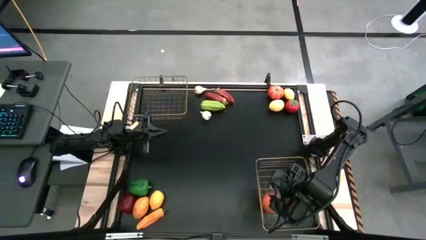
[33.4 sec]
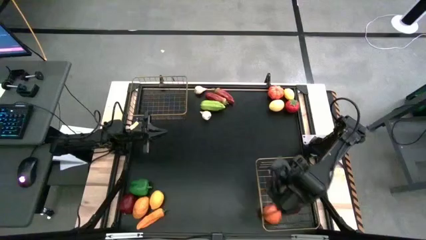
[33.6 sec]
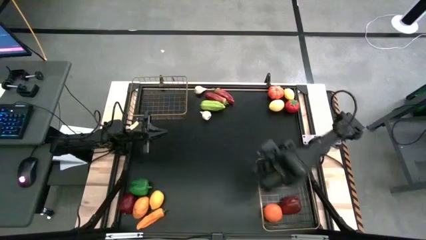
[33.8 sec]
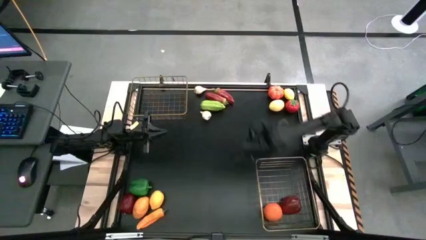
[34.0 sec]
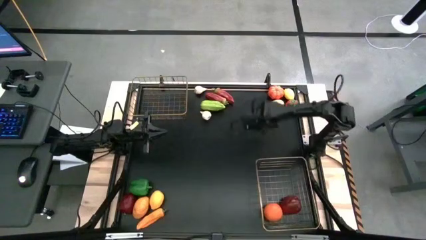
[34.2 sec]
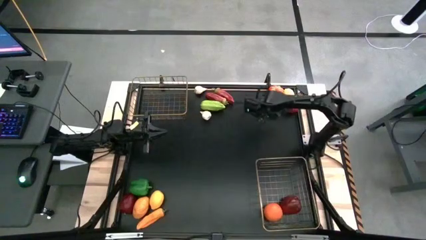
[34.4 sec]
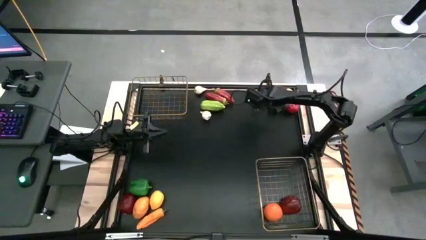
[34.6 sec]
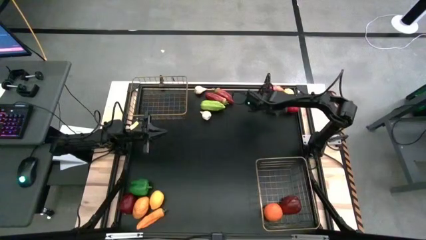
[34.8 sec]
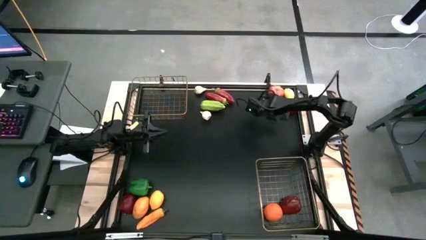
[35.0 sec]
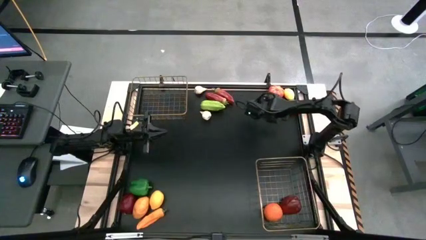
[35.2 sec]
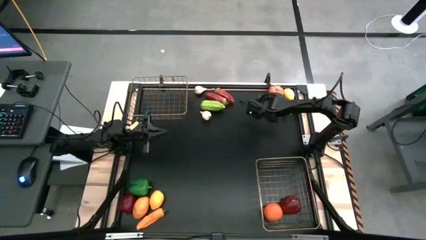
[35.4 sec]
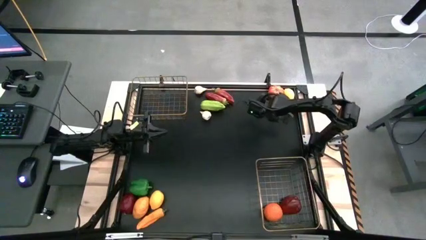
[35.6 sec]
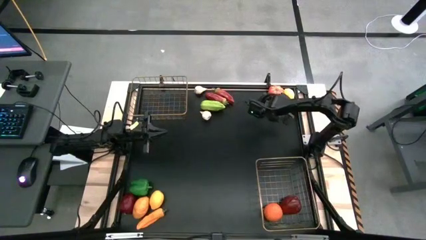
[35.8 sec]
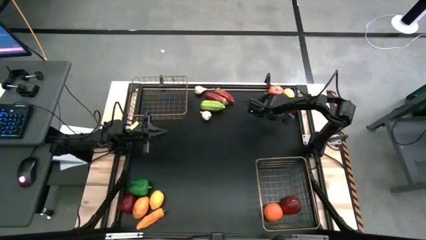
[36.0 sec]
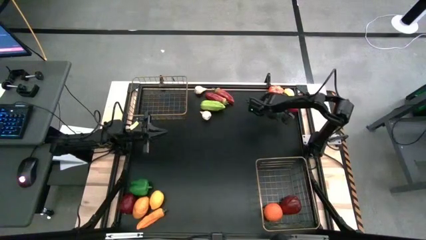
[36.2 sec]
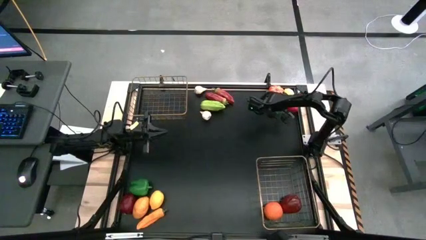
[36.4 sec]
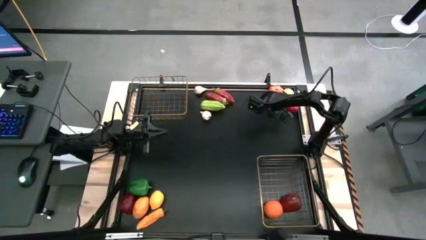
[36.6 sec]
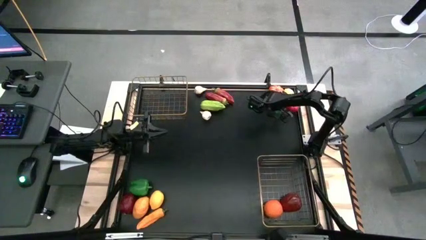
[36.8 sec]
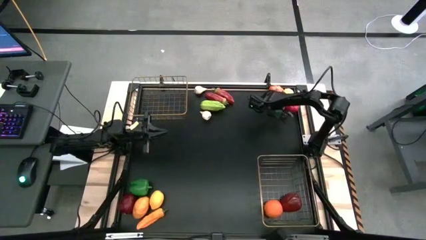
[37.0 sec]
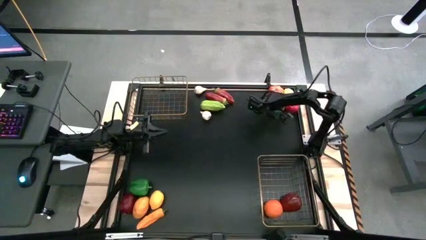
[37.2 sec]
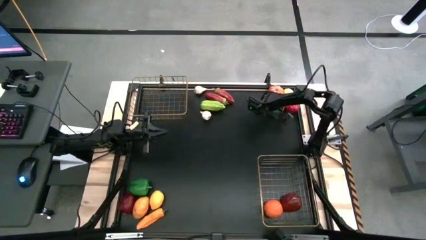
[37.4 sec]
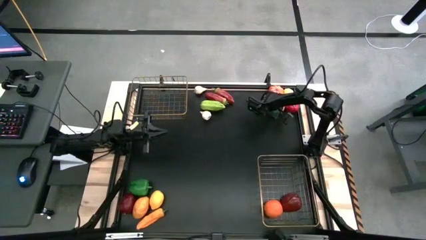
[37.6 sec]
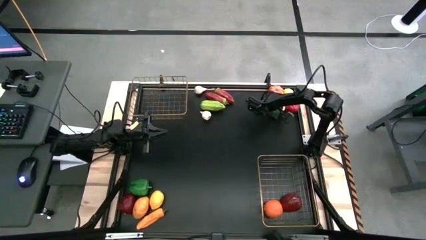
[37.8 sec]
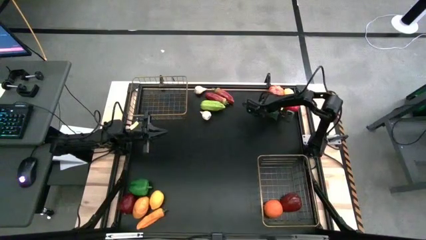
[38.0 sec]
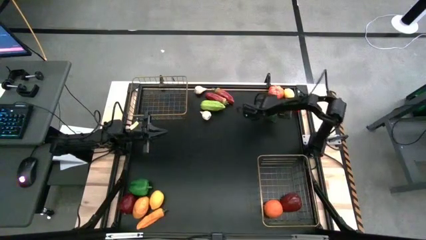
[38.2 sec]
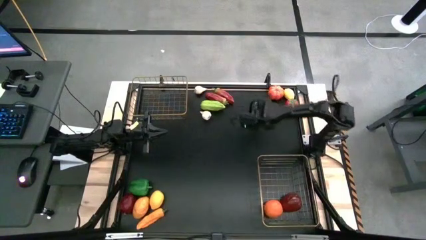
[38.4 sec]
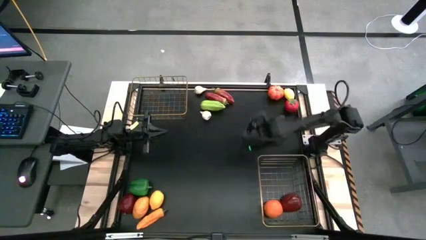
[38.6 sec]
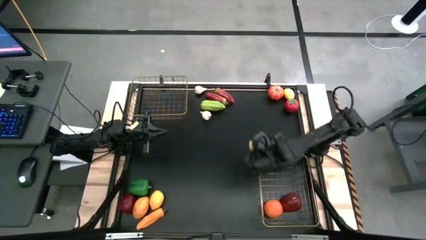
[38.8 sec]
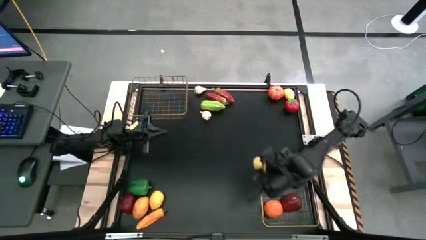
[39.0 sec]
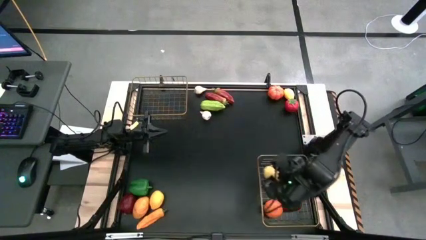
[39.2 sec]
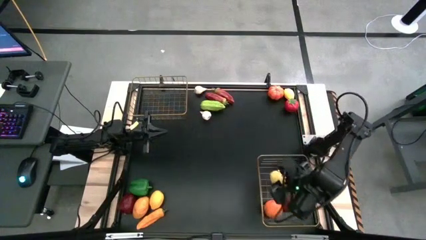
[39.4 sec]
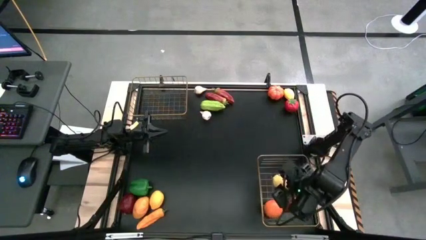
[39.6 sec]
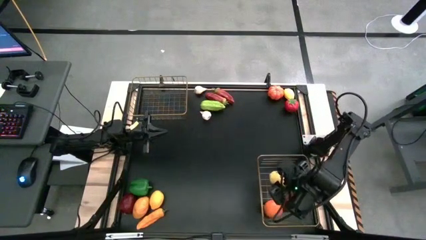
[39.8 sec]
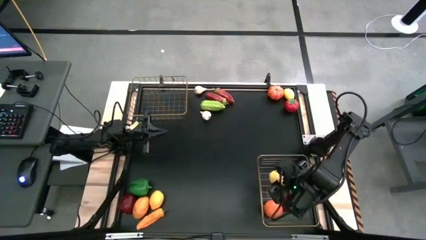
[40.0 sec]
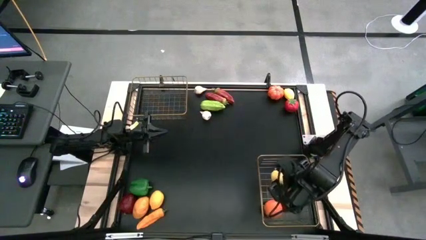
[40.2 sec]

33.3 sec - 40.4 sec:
Task: Sort produce into baskets
Put the top left yellow lemon into the bottom wire basket

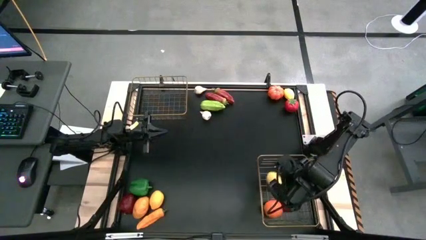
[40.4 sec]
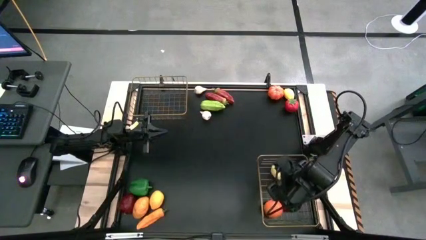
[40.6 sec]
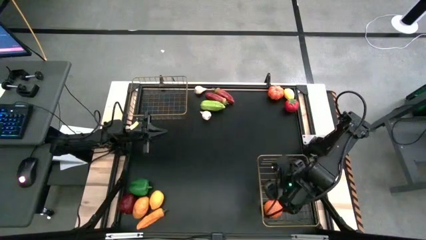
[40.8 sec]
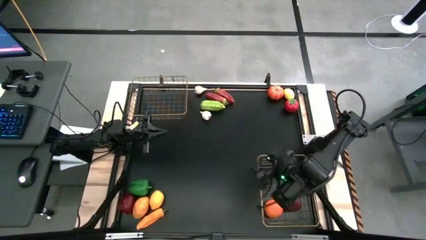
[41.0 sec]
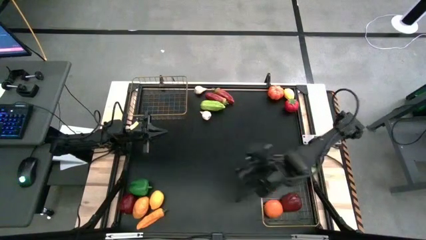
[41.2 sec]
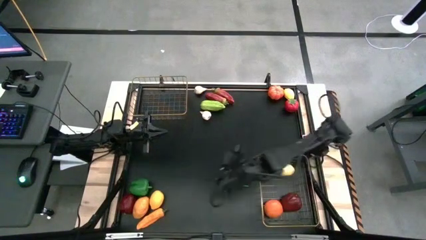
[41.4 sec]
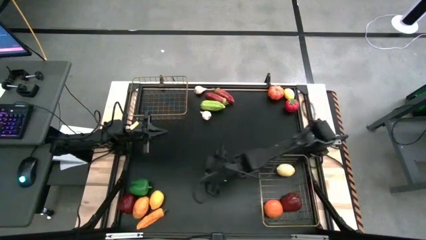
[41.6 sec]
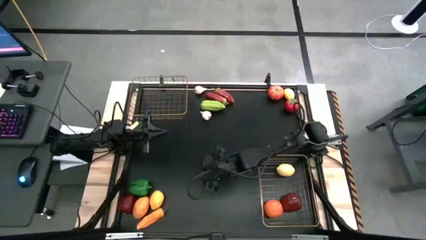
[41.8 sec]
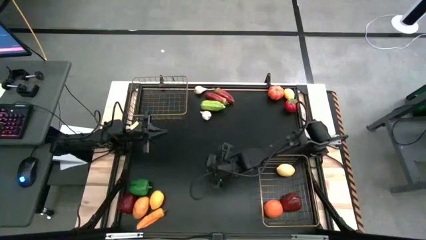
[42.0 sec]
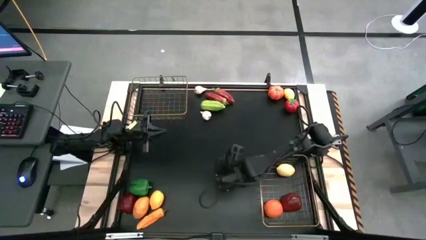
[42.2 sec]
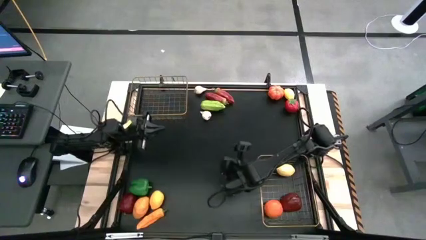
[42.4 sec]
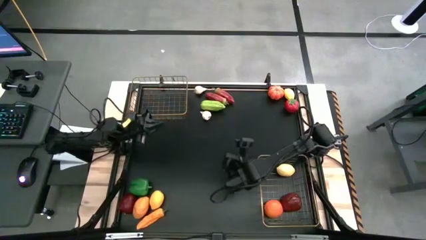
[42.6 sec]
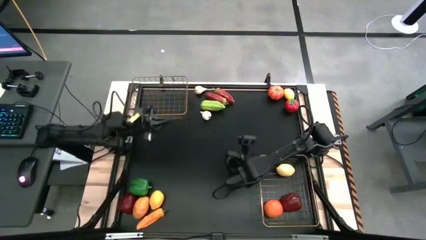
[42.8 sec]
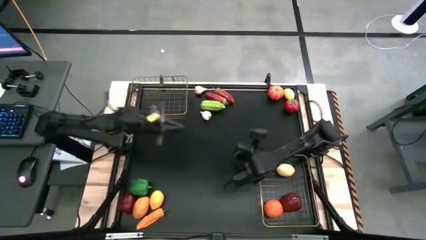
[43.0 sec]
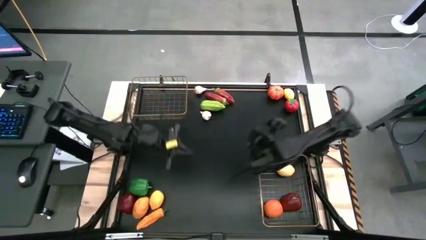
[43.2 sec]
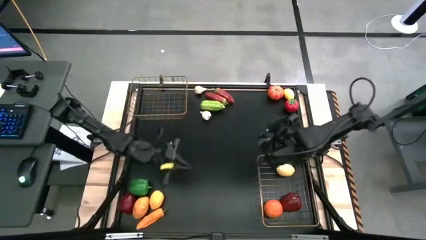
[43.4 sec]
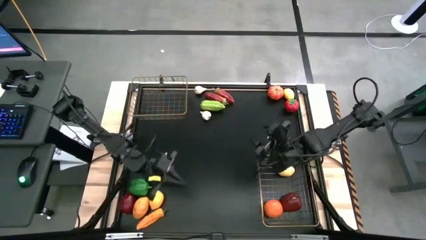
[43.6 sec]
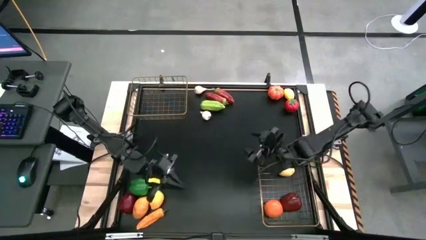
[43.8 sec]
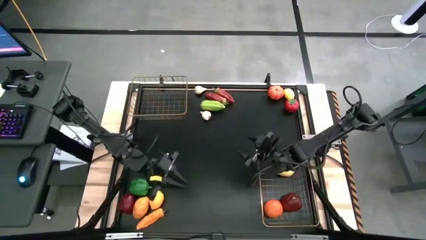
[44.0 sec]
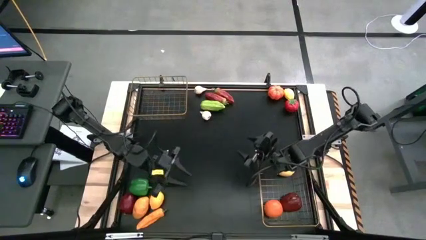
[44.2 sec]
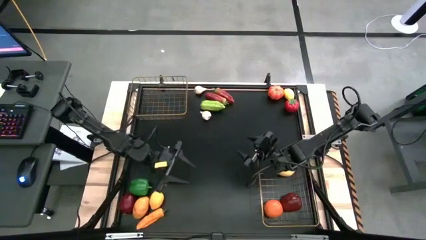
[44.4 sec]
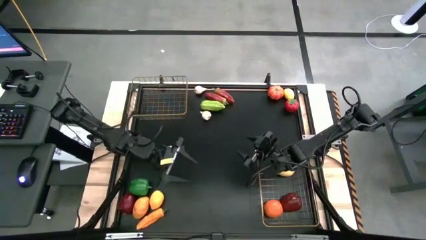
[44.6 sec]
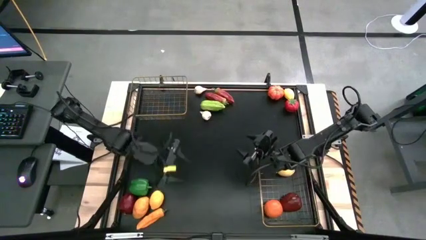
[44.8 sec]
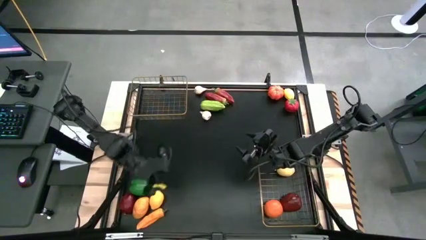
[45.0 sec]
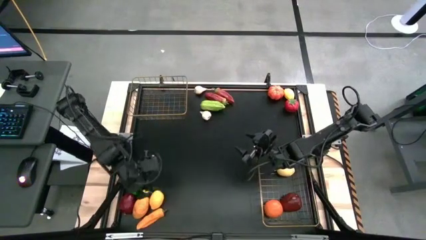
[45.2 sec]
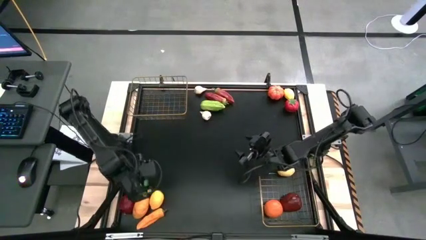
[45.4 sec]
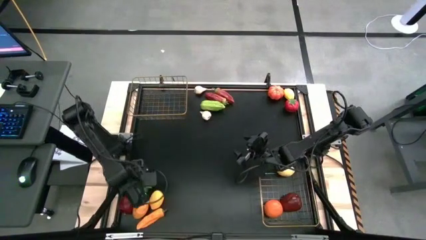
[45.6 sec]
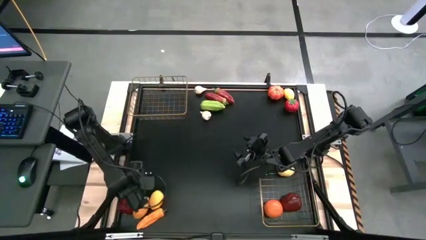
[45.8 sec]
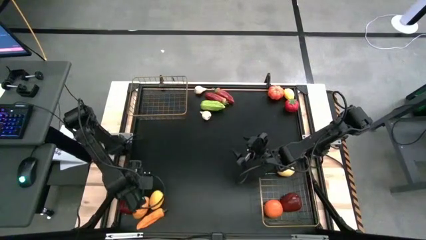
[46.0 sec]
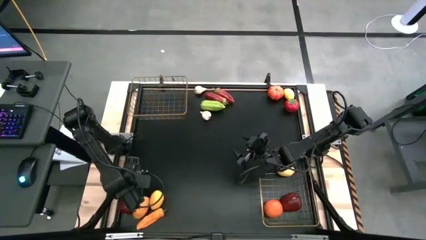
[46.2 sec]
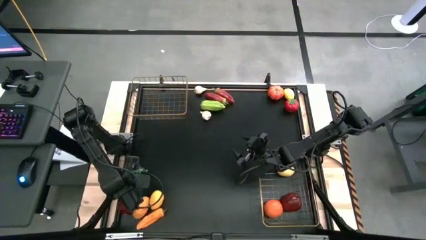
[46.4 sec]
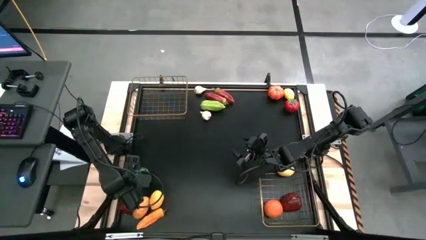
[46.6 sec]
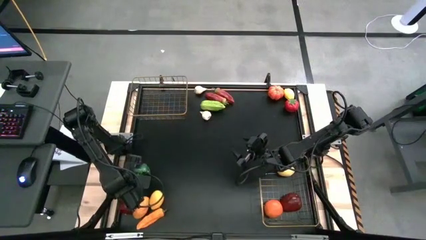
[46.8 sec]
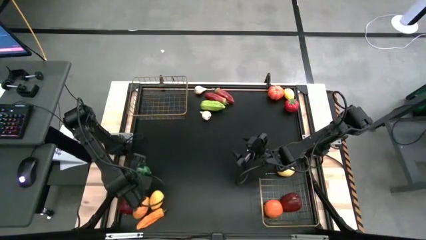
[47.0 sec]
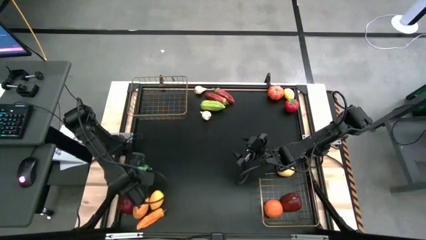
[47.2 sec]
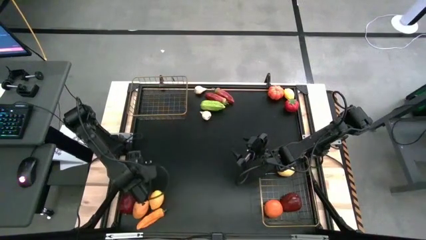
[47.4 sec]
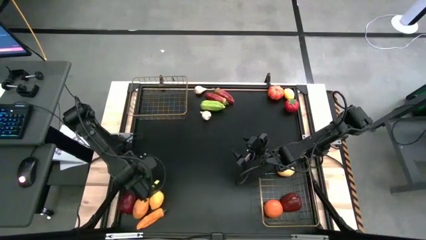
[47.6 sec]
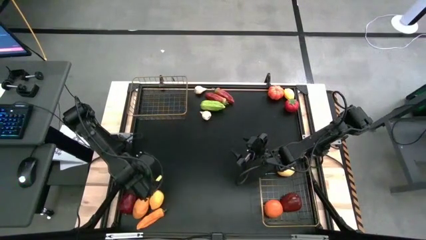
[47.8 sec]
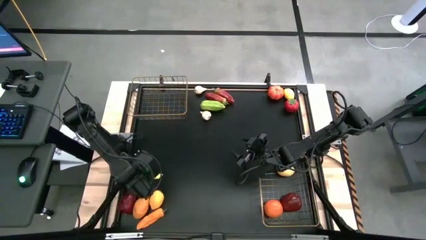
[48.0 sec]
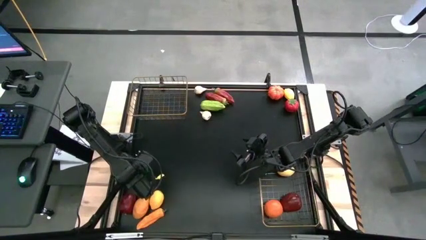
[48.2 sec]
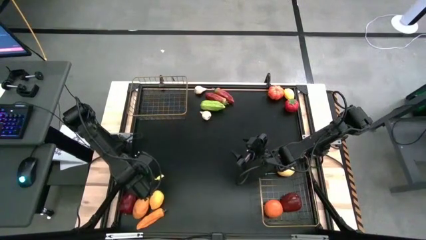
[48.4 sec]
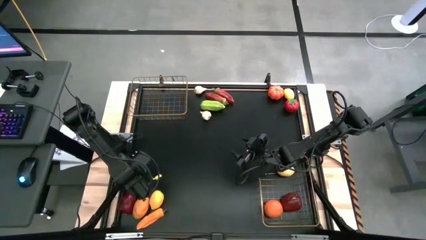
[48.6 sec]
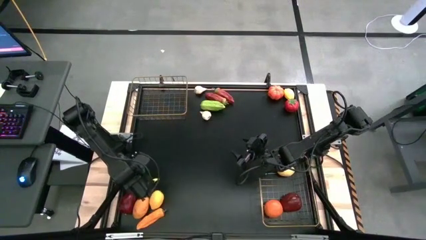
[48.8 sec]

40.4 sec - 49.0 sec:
Put the green bell pepper into the top wire basket
